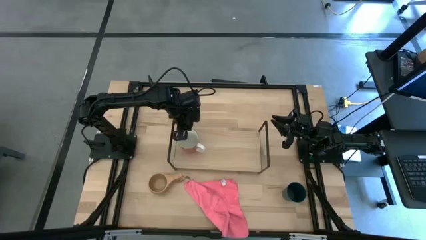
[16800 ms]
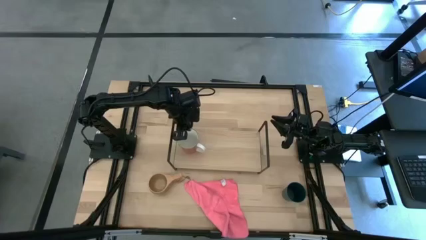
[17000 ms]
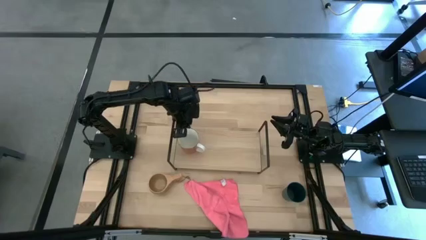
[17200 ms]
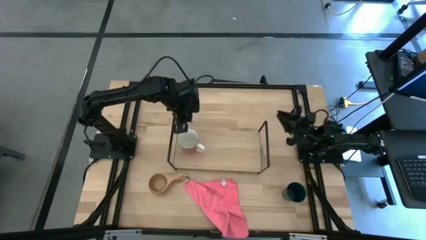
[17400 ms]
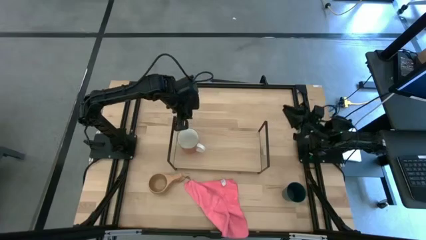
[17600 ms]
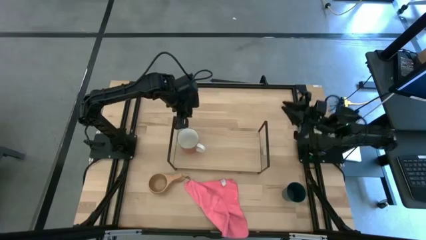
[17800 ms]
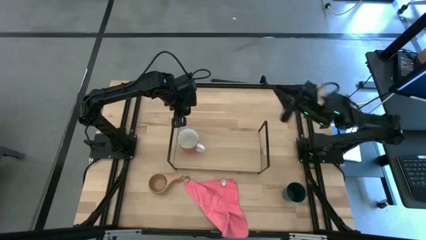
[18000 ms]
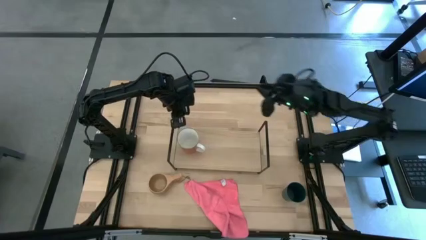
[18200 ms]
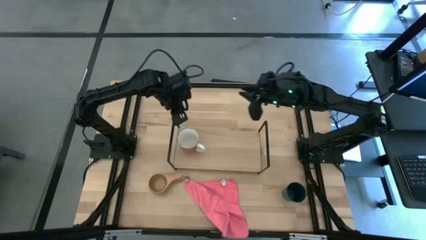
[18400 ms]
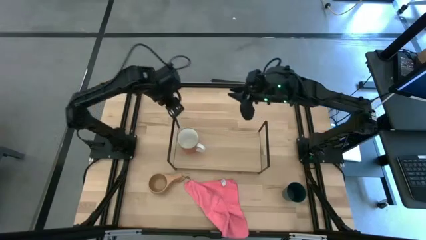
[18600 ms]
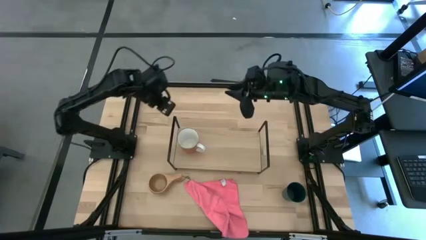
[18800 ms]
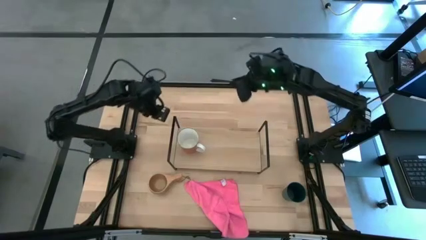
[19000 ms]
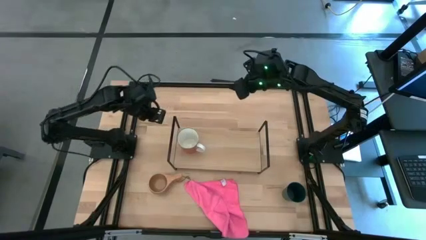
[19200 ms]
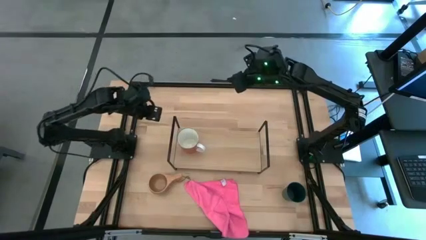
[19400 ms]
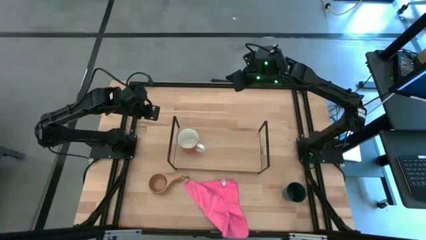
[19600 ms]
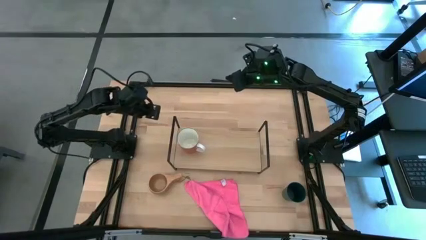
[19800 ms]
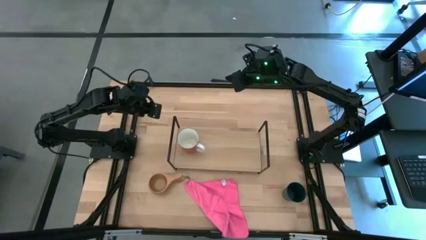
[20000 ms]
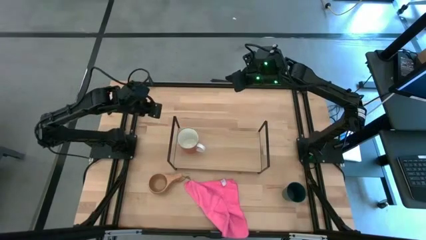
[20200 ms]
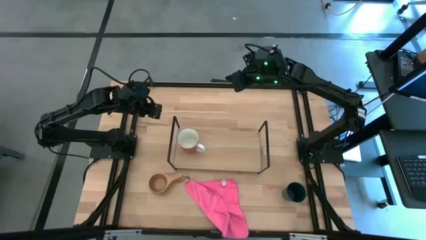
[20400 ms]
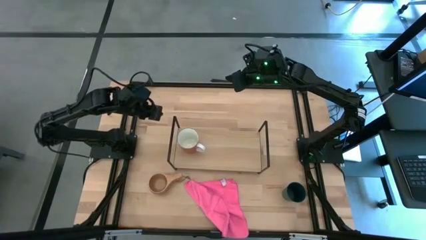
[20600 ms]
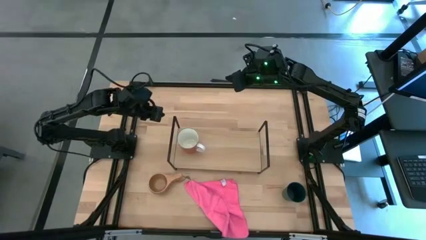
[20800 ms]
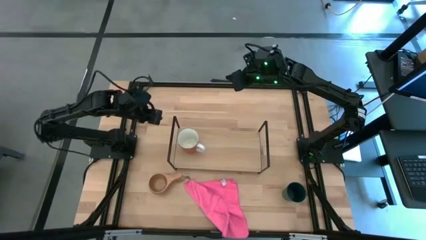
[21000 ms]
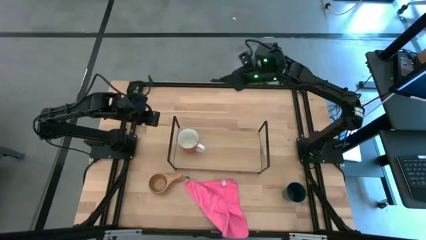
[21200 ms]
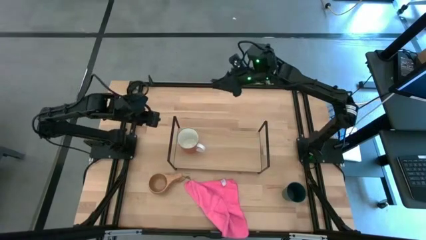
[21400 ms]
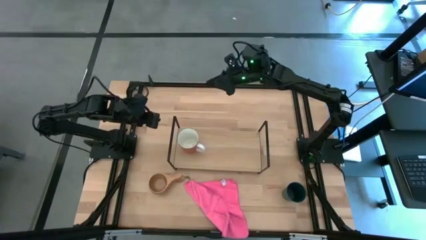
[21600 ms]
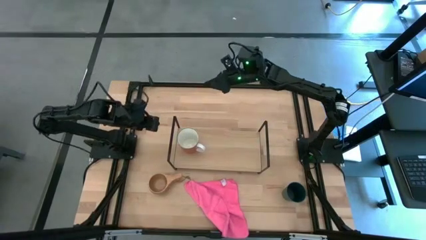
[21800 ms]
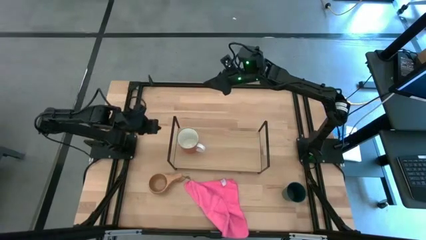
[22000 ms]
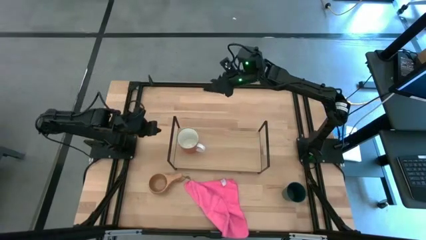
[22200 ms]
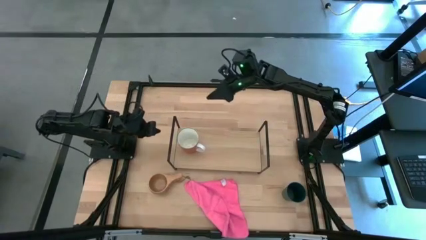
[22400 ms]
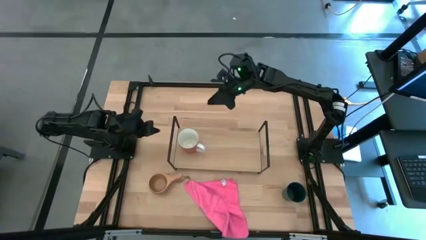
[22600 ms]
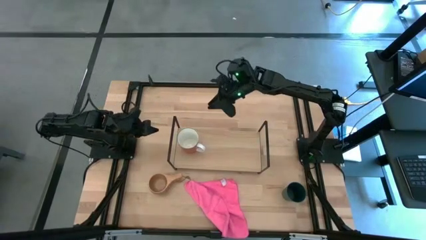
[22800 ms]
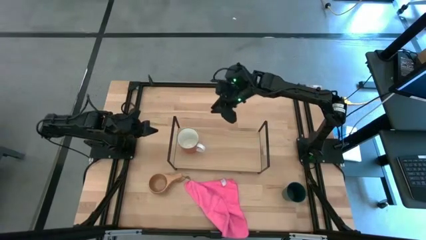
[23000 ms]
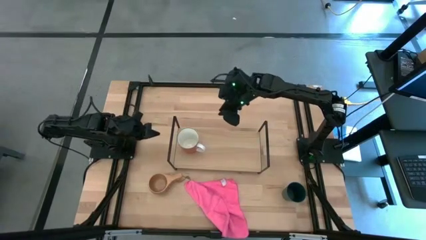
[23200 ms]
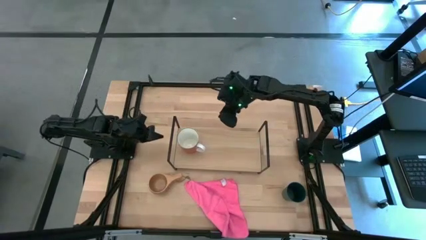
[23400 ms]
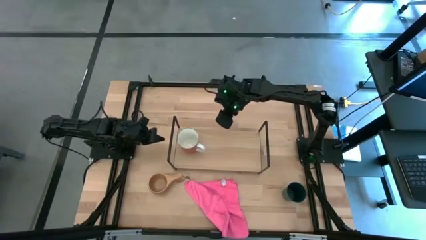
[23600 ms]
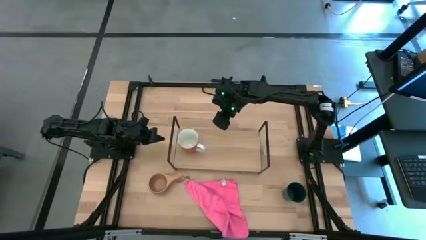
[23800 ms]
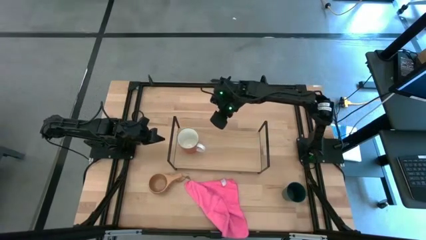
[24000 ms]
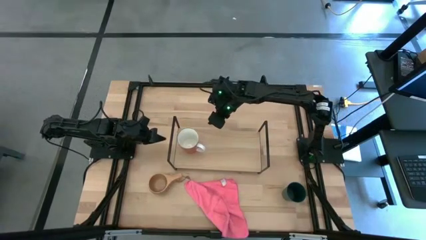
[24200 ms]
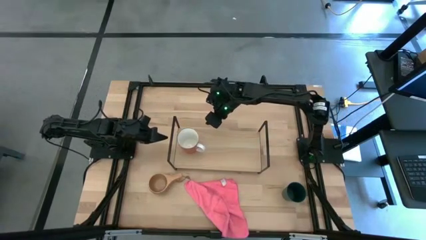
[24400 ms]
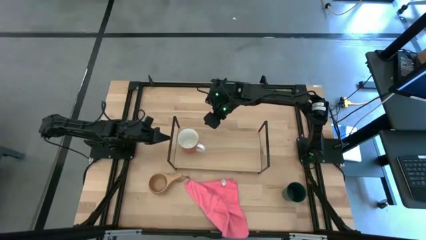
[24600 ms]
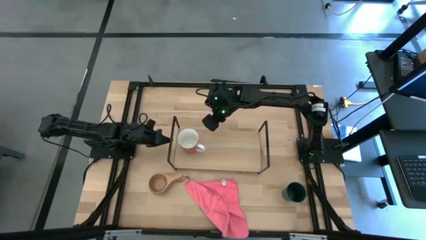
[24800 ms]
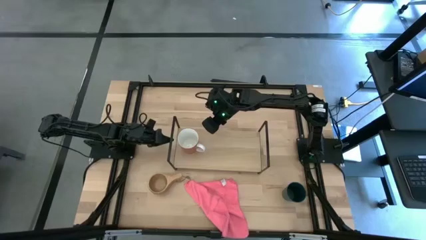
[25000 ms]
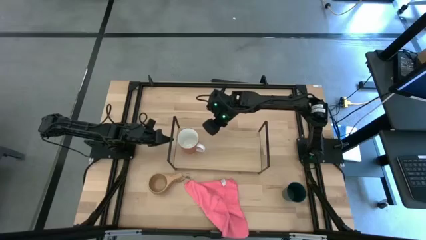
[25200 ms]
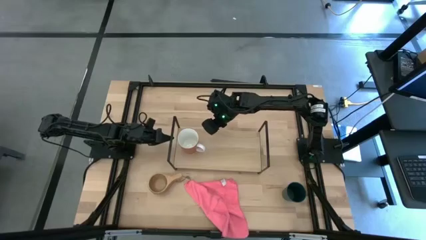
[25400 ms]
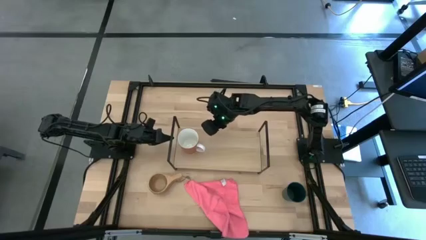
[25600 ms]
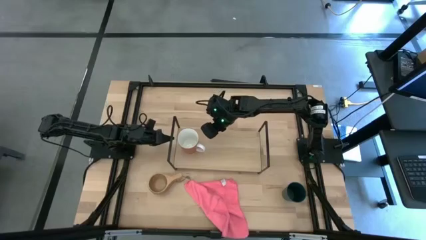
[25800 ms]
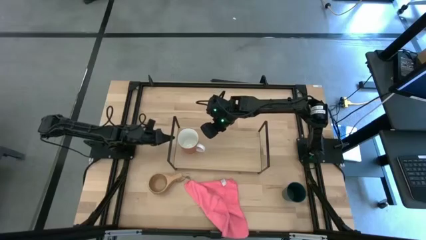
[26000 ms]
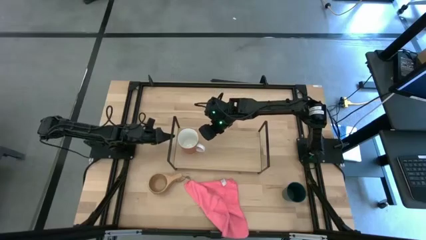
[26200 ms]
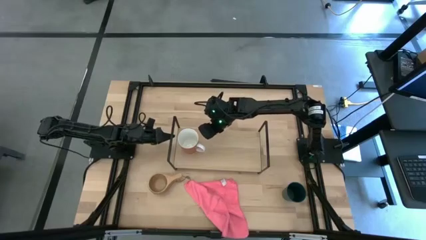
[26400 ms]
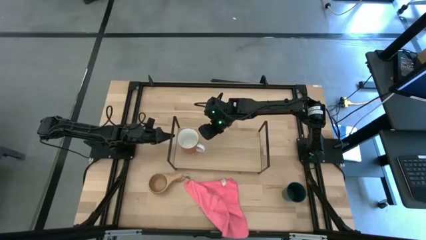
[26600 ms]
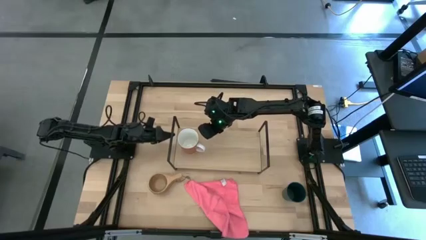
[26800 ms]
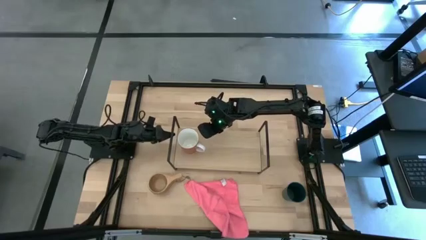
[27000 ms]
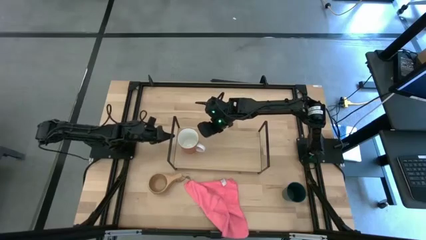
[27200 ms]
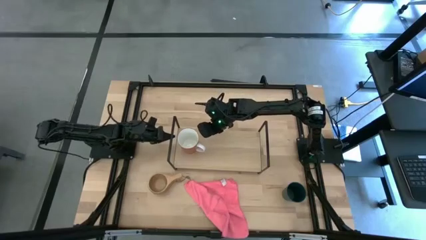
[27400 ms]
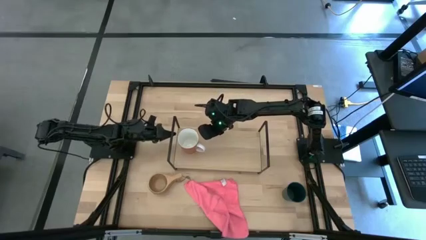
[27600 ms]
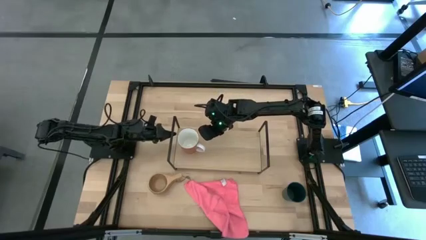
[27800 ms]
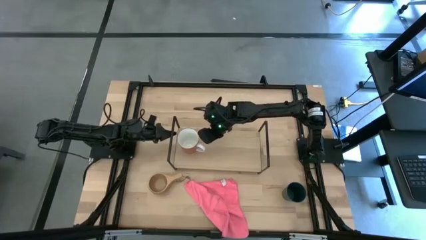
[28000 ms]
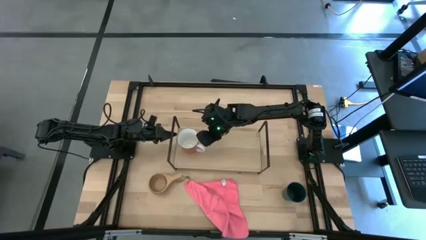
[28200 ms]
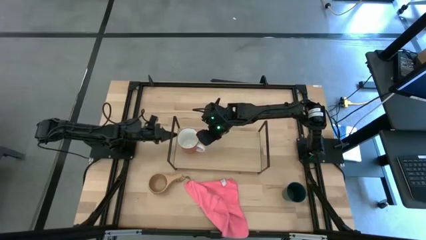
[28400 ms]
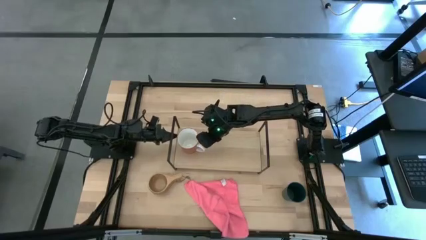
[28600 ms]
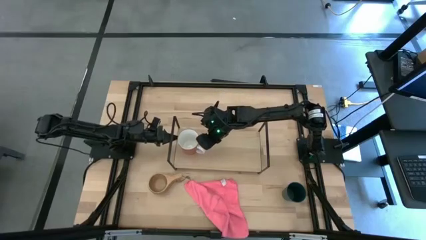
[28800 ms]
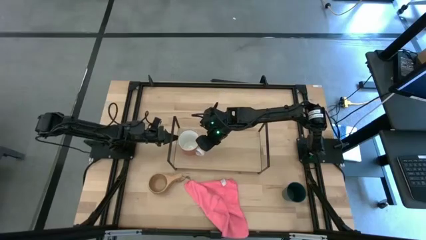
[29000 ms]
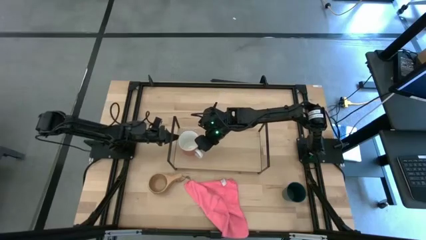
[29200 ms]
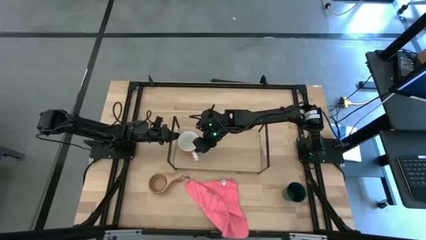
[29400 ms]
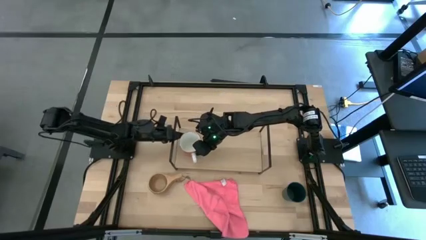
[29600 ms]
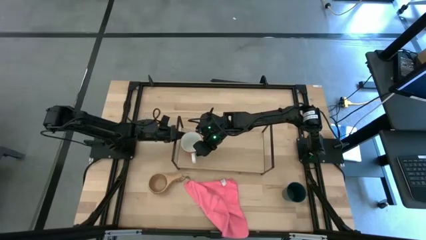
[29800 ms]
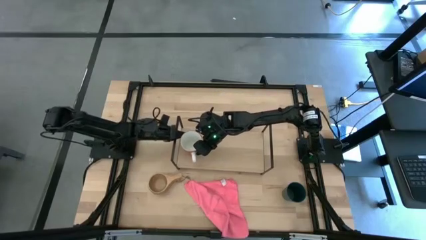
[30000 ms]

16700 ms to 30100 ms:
Task: Stack small to large cups/mugs on shelf
Adjust the orange mug on the shelf
